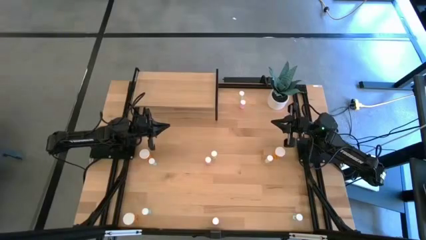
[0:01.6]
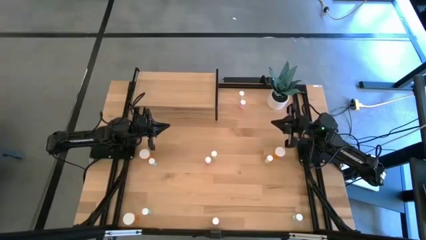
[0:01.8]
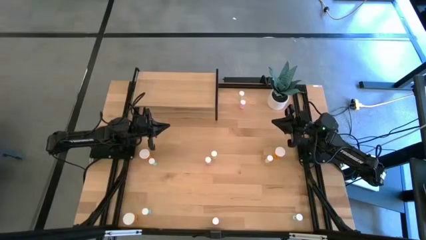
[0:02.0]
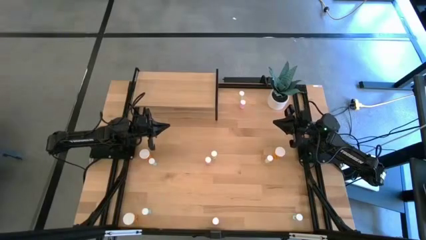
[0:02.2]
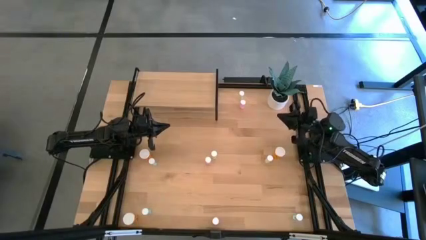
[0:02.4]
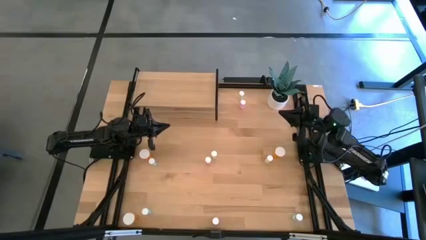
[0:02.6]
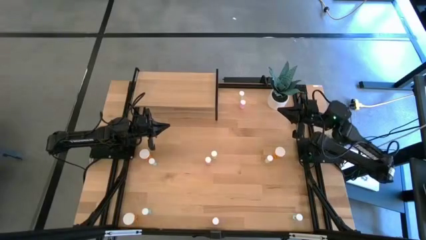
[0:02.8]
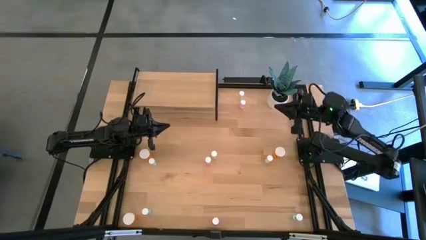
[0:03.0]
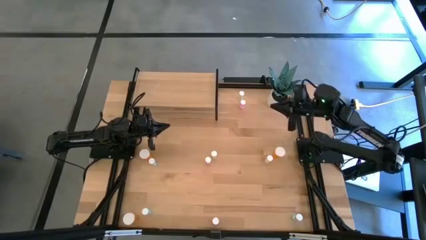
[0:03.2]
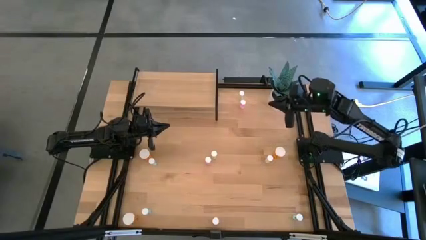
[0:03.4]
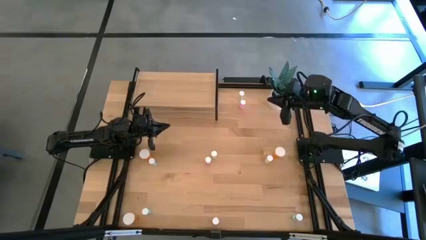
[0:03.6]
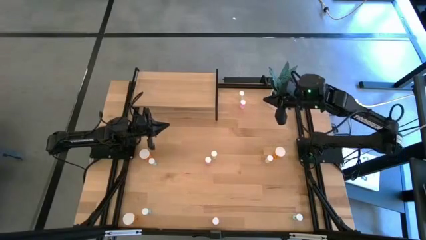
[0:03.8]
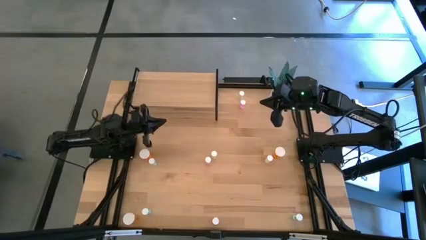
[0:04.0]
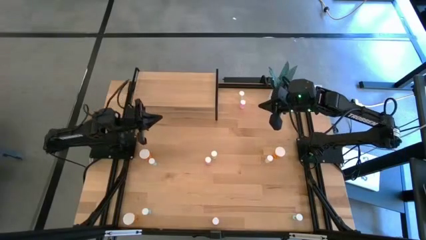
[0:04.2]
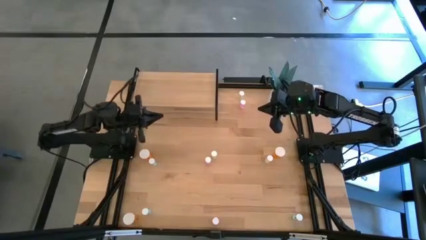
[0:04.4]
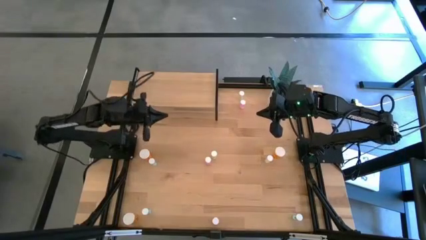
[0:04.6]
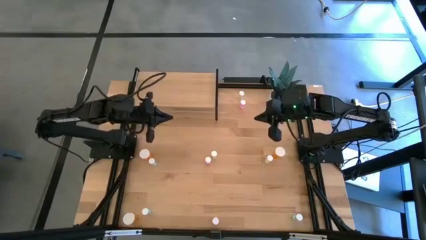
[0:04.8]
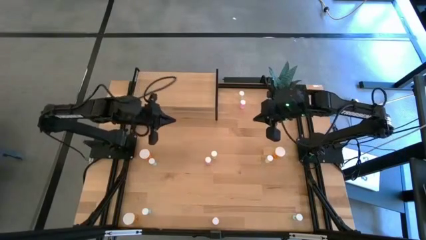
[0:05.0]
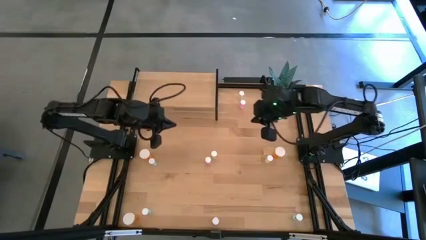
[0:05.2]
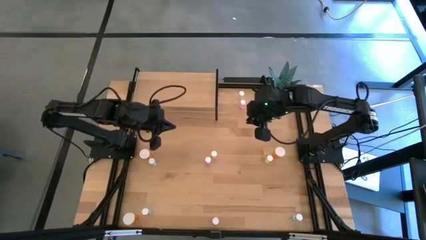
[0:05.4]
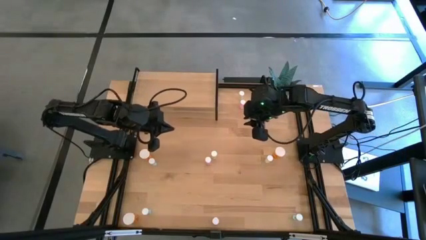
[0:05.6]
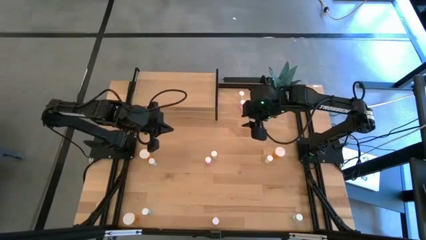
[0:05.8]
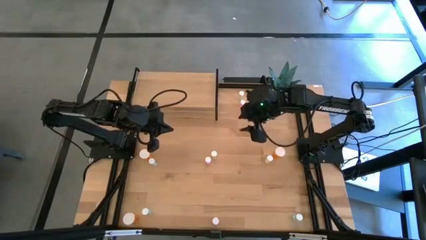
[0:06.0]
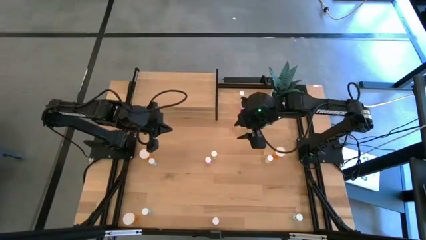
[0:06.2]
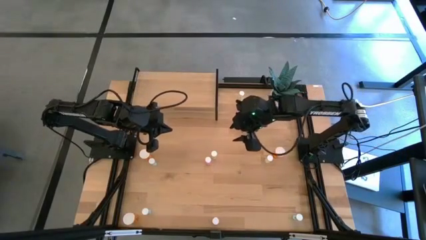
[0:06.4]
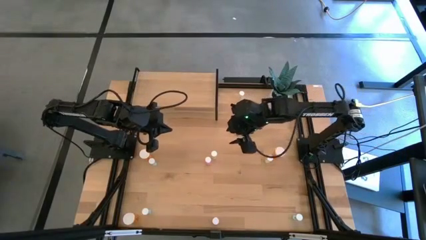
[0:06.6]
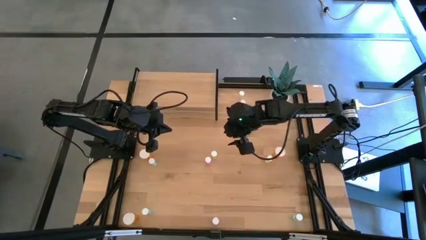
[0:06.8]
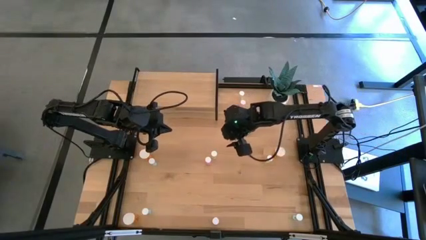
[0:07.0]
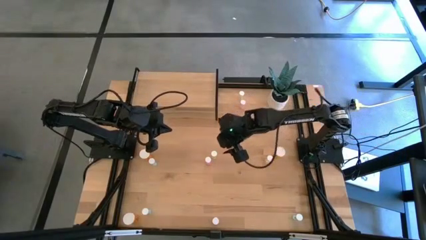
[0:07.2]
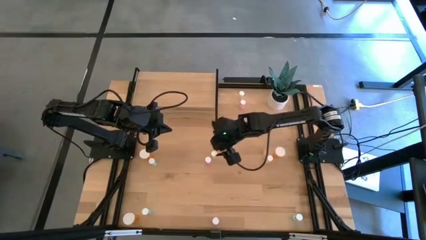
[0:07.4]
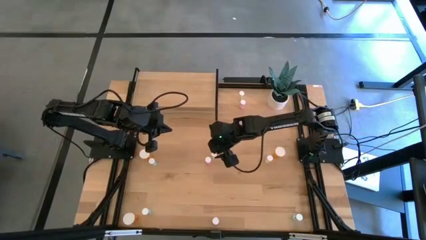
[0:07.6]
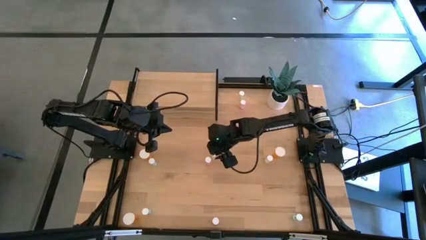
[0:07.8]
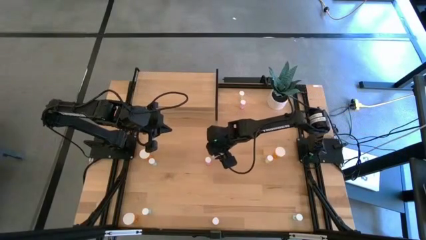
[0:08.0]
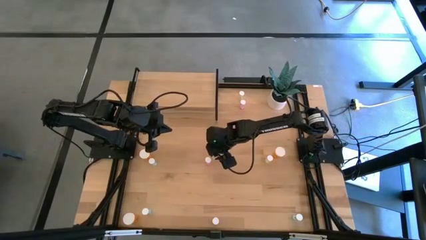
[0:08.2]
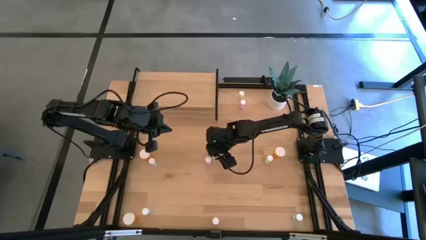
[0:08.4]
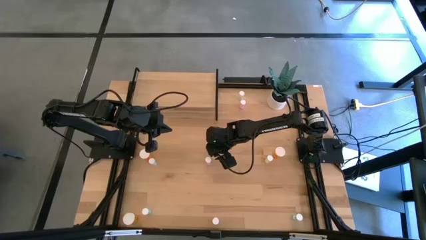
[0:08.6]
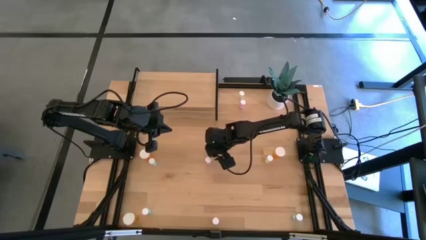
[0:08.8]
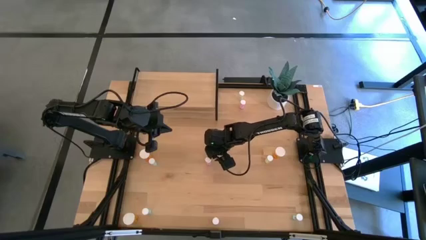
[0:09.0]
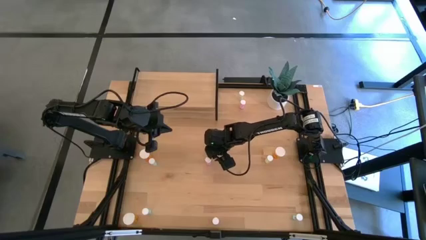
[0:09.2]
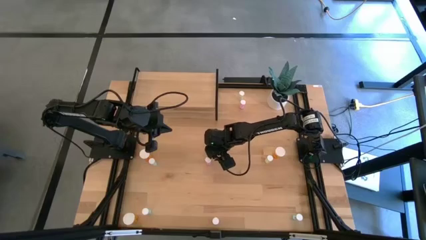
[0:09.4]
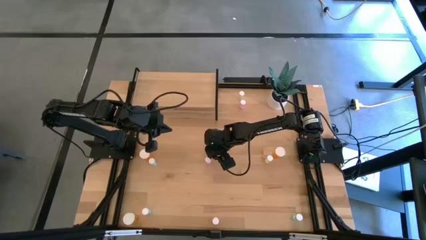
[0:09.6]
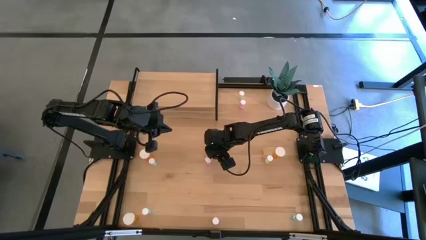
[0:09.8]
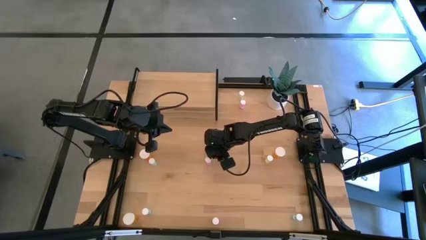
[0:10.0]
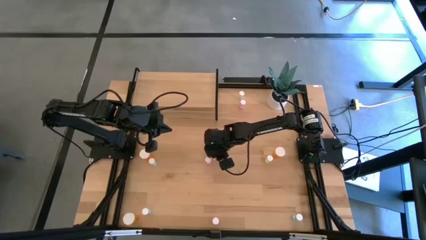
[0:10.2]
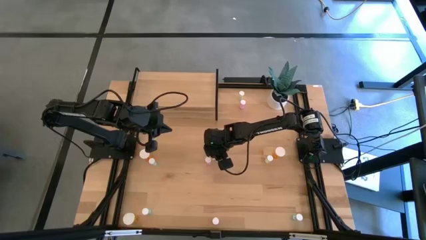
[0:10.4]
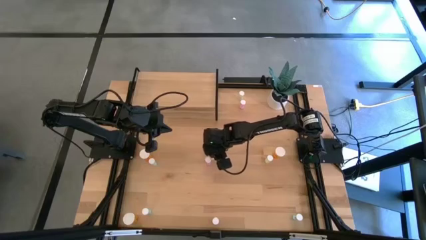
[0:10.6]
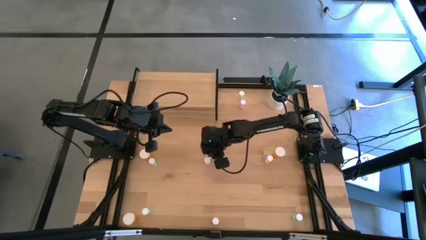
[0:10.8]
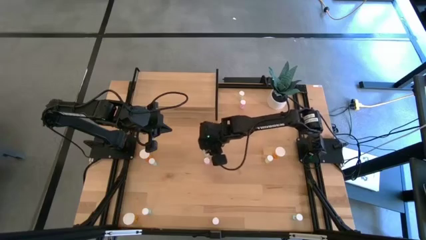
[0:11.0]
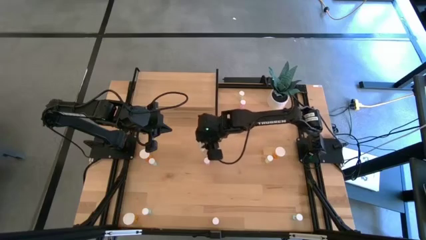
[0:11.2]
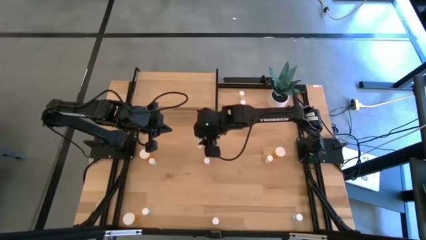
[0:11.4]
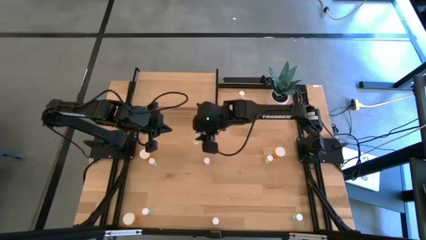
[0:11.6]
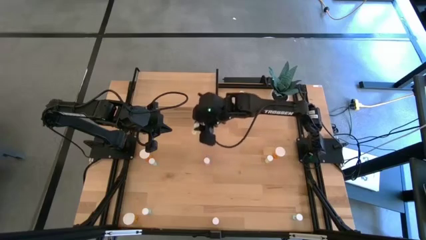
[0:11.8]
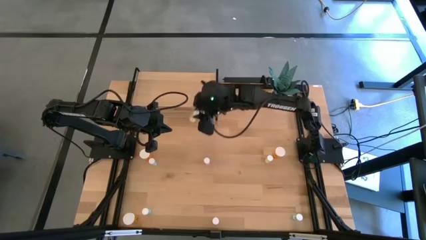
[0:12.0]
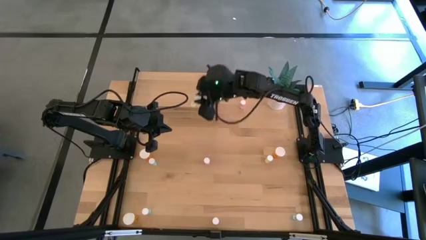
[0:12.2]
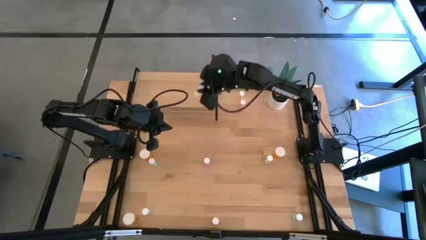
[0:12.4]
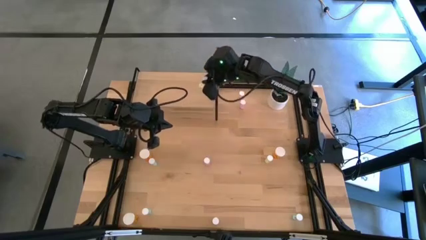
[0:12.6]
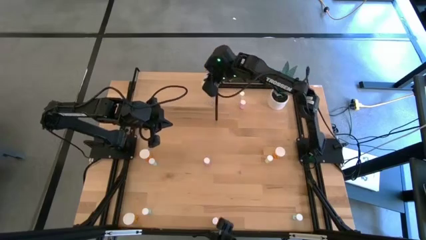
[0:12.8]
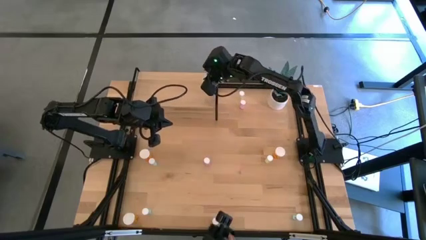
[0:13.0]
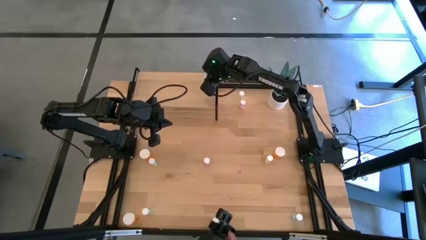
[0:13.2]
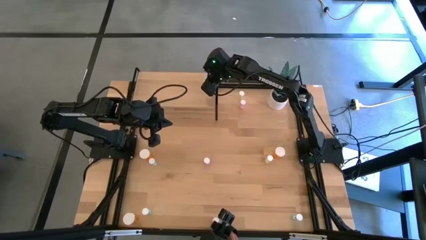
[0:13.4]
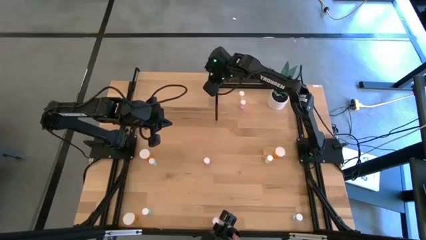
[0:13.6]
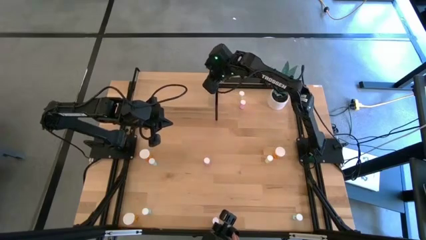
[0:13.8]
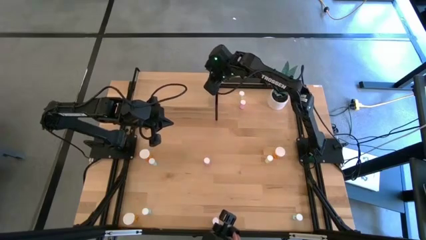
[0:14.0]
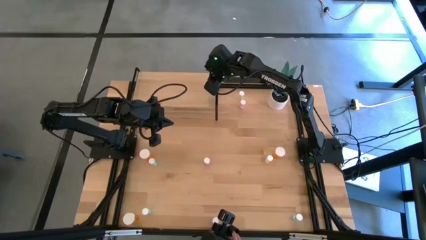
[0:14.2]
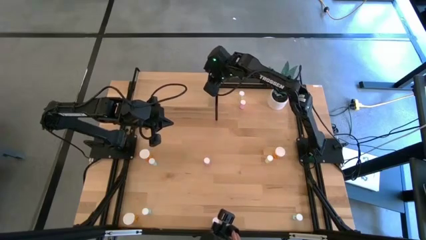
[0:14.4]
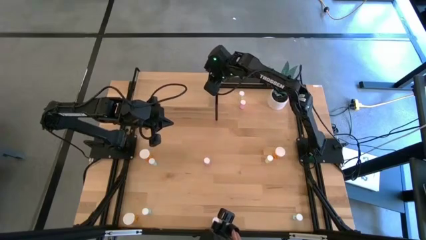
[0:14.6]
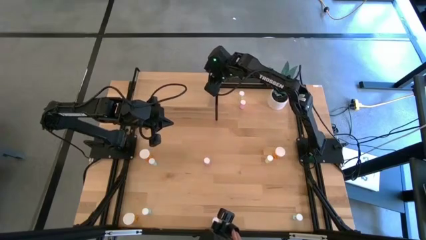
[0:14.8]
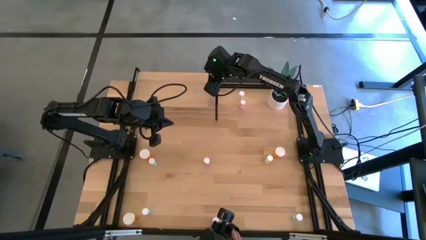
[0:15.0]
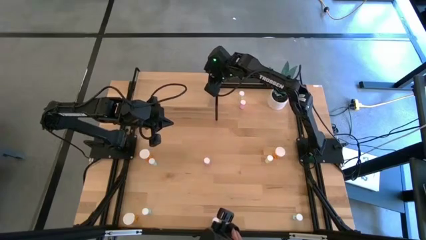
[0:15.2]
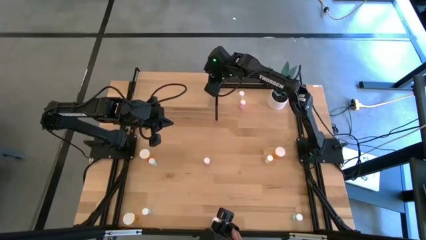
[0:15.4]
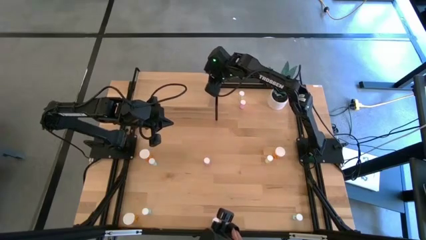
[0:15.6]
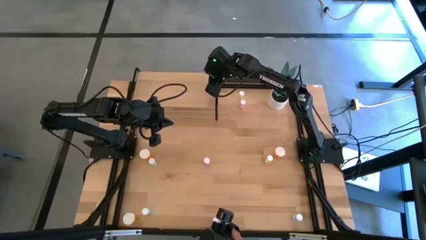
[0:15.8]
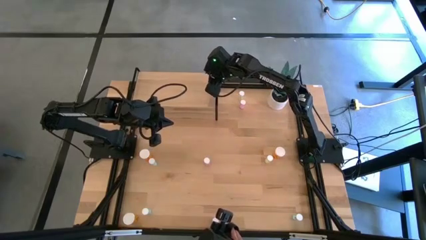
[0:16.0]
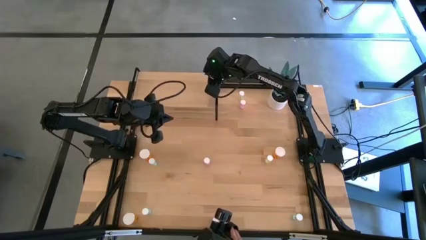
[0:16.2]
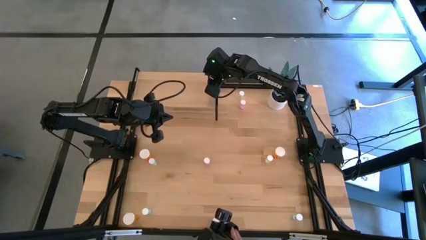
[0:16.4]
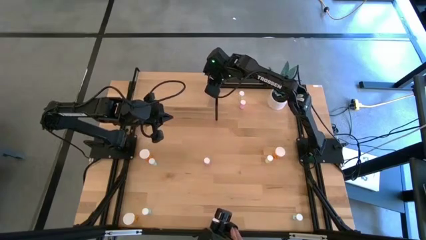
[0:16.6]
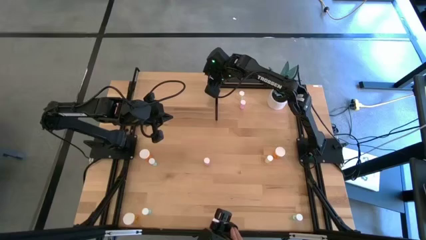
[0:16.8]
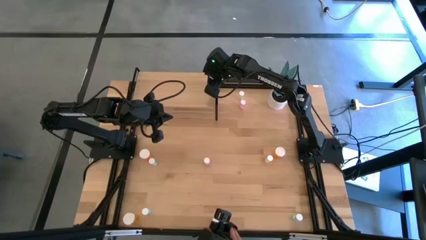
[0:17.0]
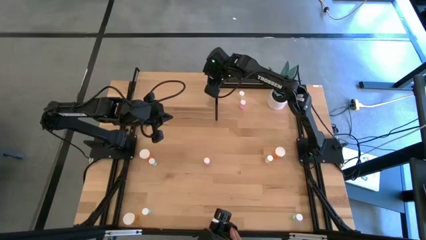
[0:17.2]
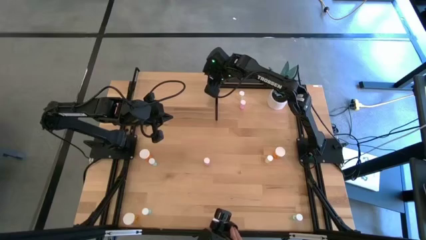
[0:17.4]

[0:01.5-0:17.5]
Task: Pick and place medicine bottles onto shelf by color
Put the bottom left yellow pill bottle on the shelf
